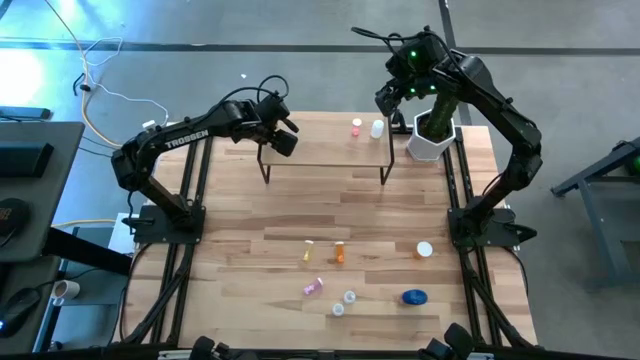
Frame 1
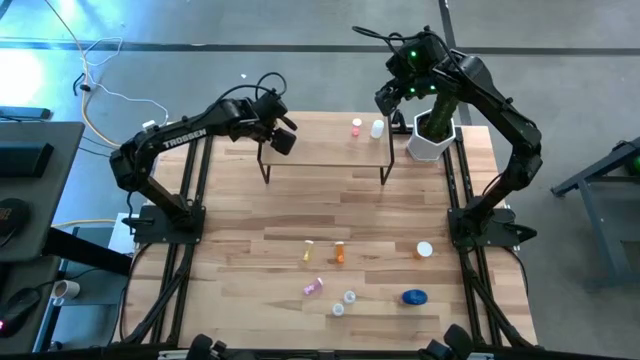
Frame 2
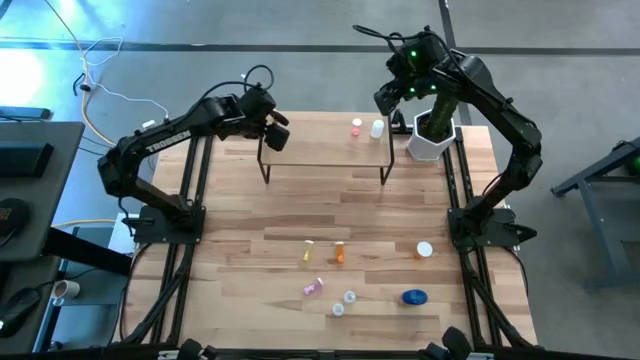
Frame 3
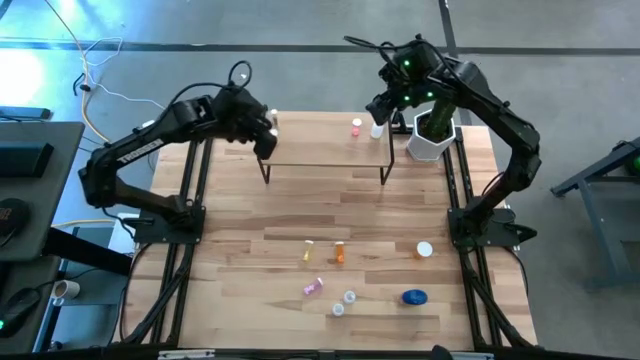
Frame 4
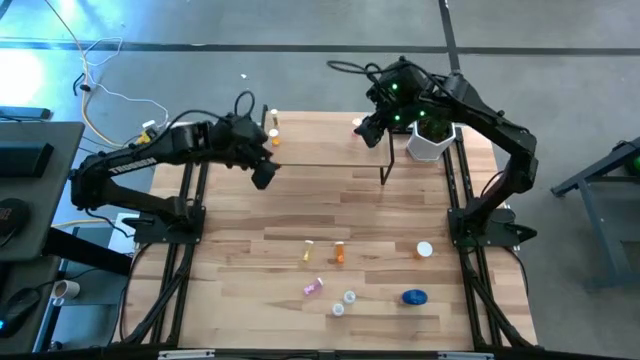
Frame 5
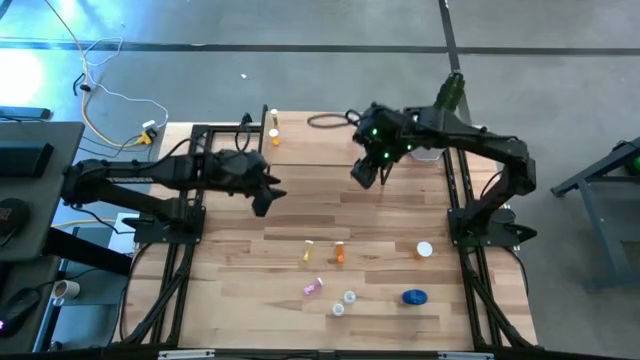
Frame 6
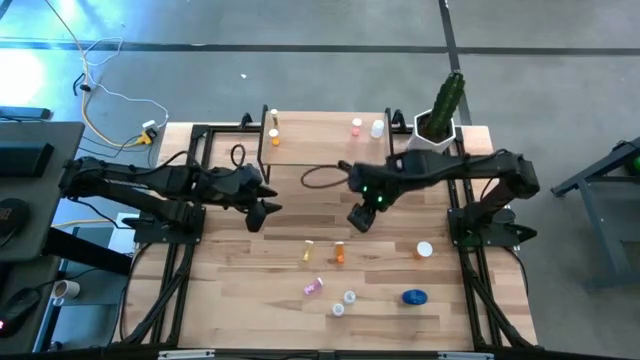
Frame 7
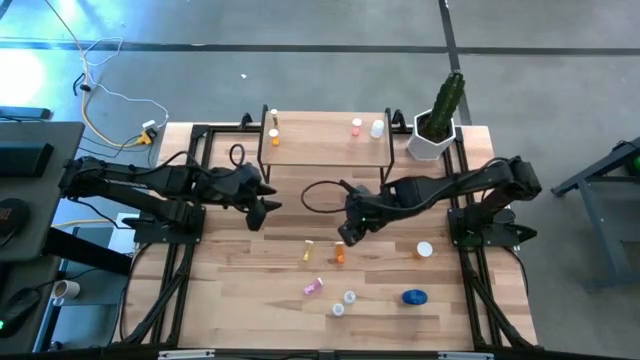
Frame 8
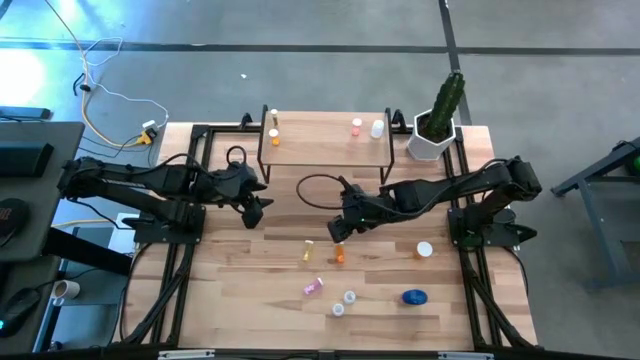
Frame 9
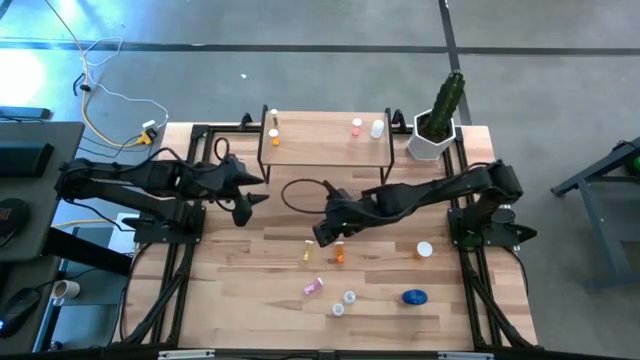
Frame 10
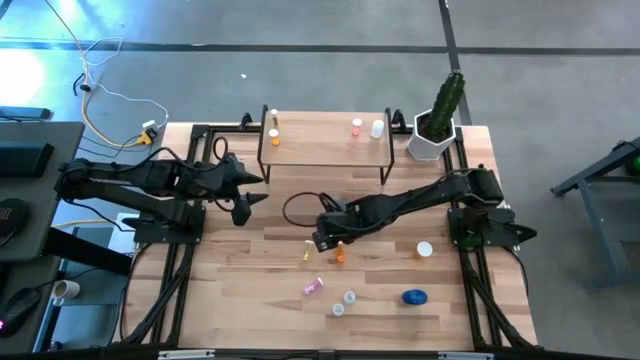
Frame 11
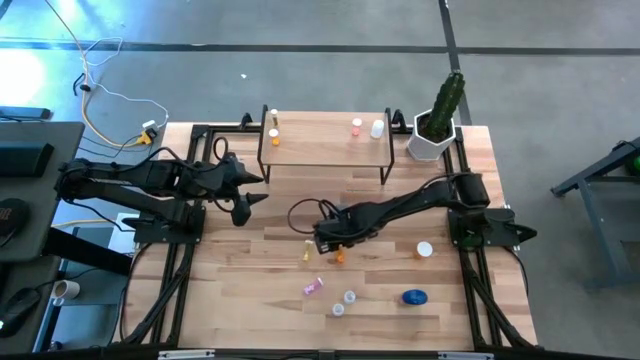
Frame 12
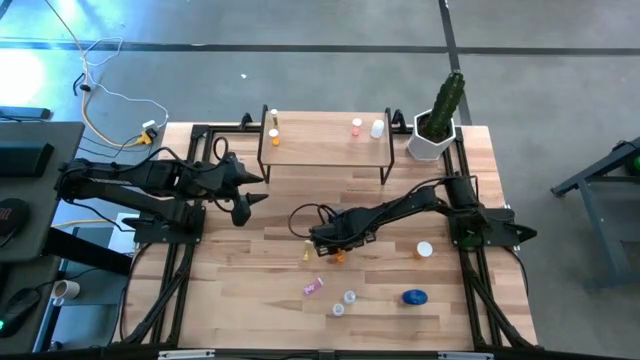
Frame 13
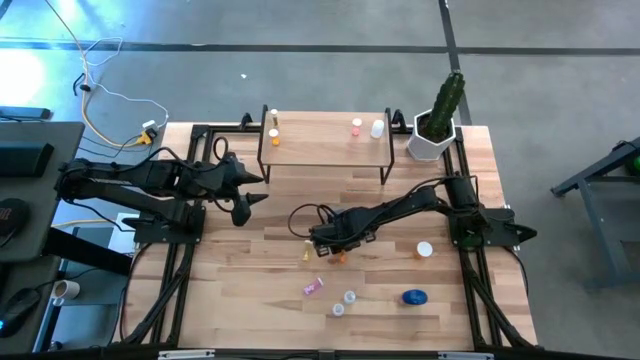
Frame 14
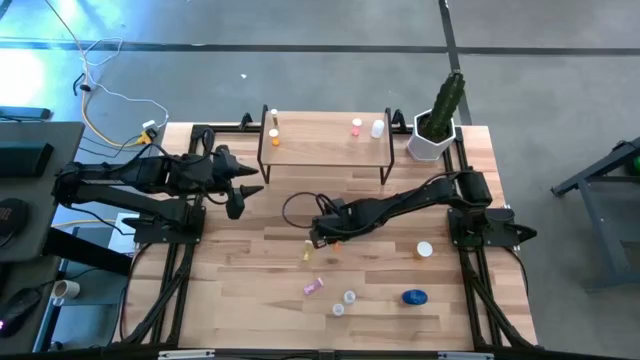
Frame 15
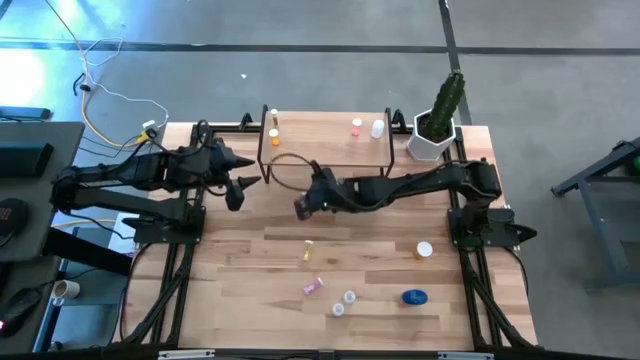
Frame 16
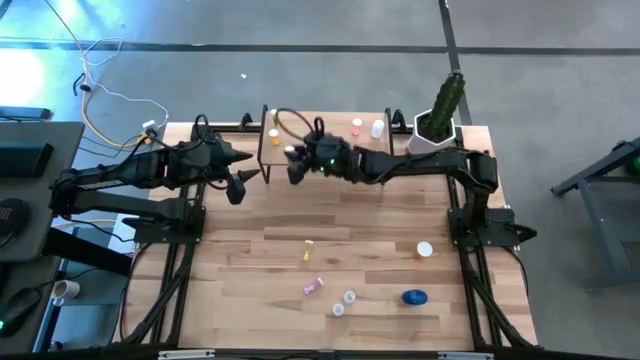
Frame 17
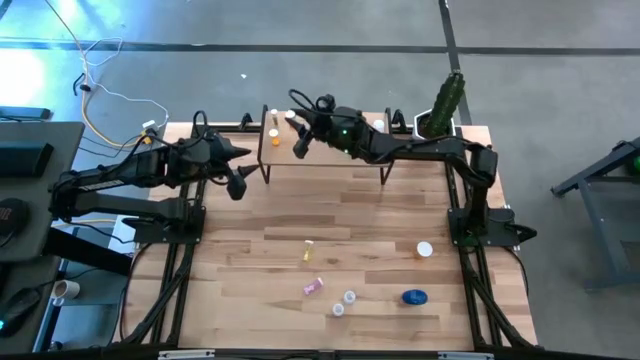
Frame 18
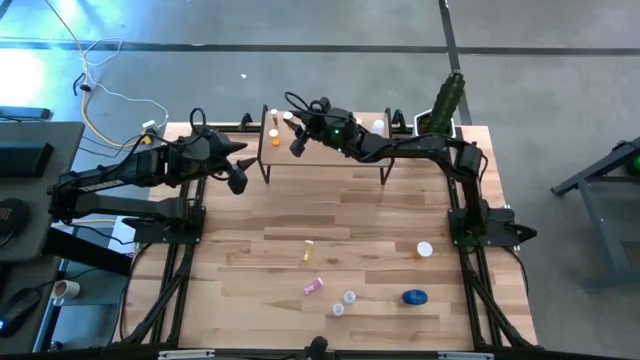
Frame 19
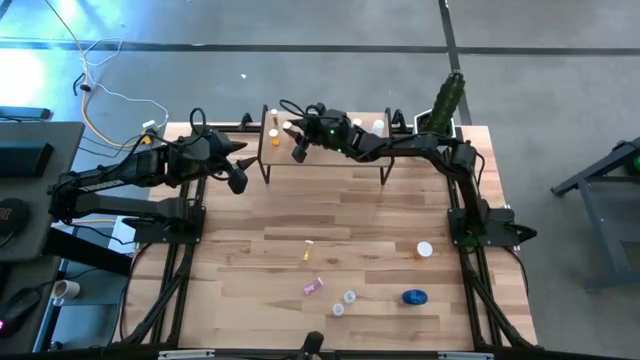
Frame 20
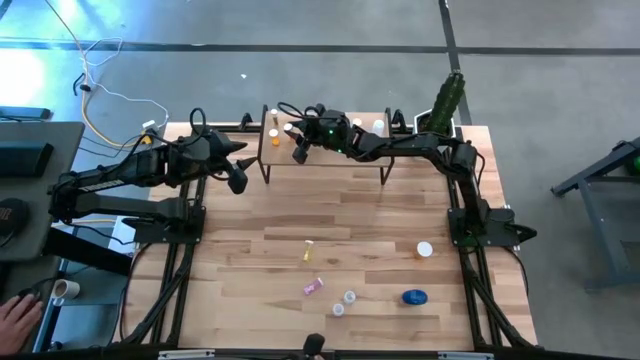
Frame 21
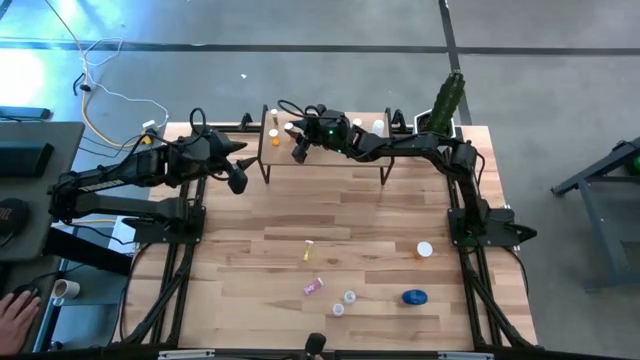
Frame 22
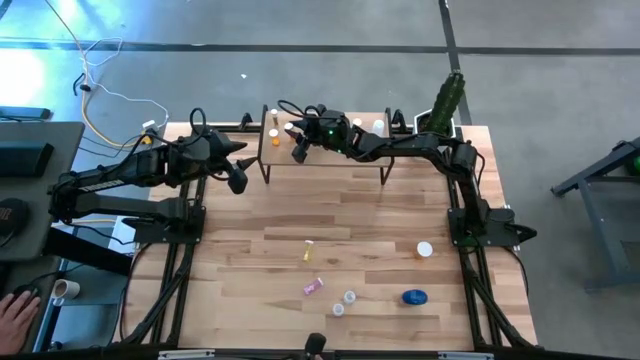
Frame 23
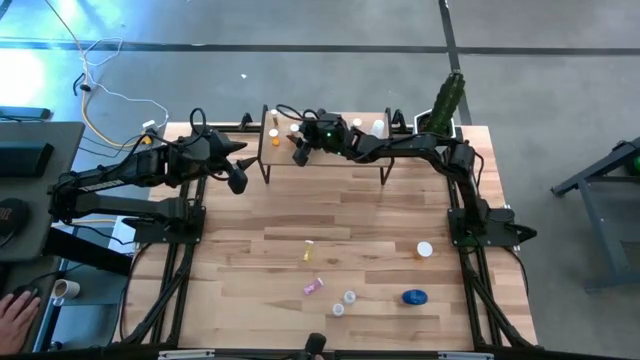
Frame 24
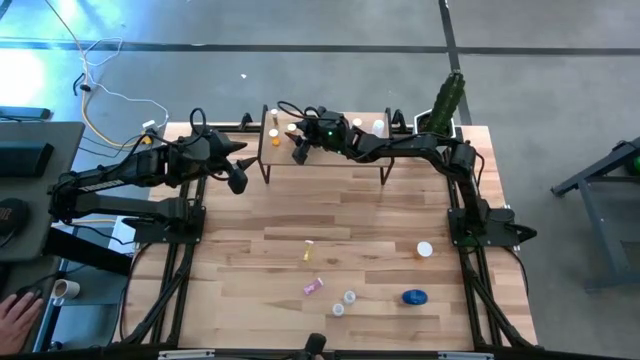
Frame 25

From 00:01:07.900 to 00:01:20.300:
Task: Pick and place medicine bottles onto shelf by color
Put the orange pill bottle on the shelf

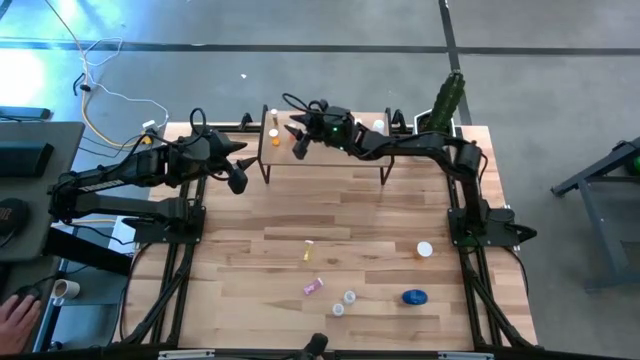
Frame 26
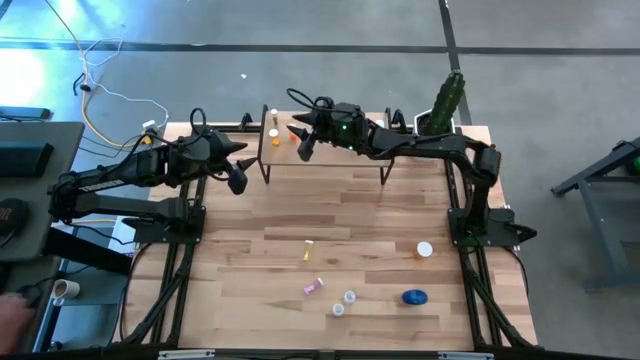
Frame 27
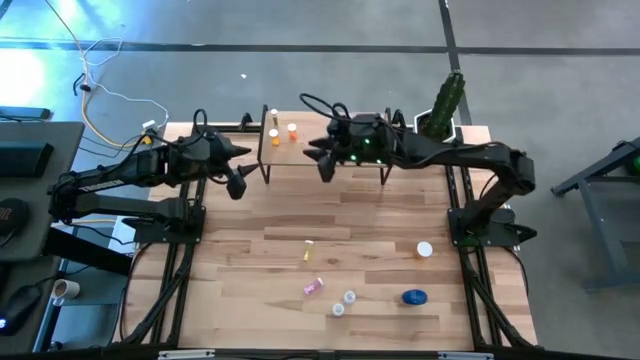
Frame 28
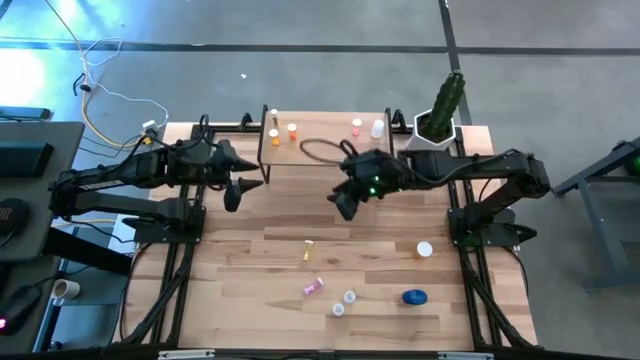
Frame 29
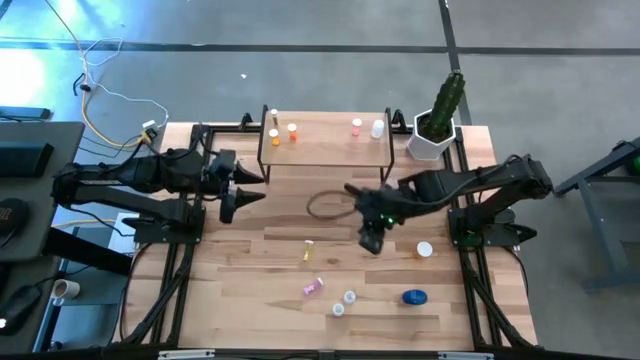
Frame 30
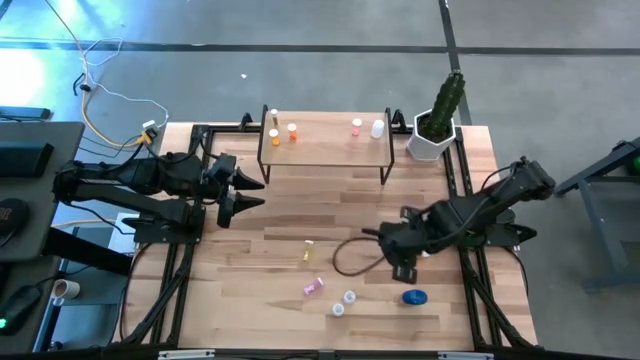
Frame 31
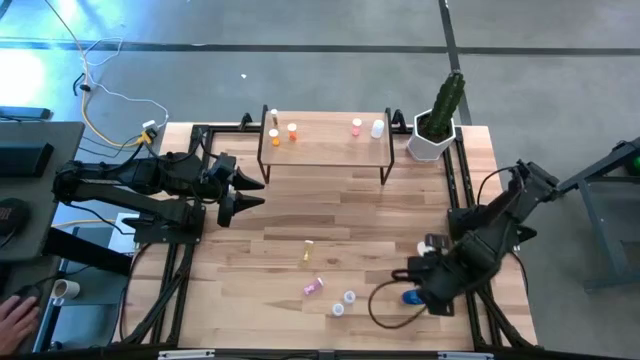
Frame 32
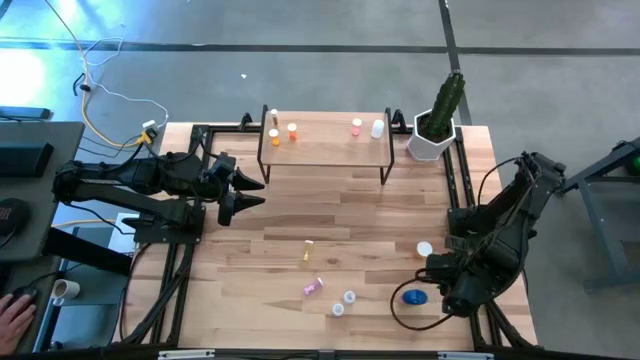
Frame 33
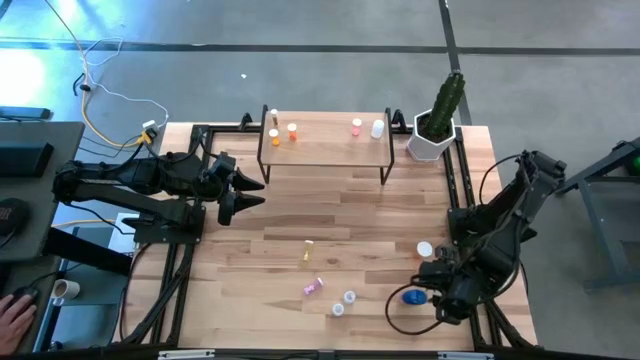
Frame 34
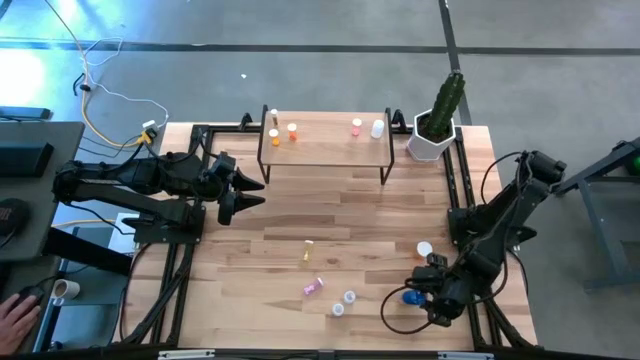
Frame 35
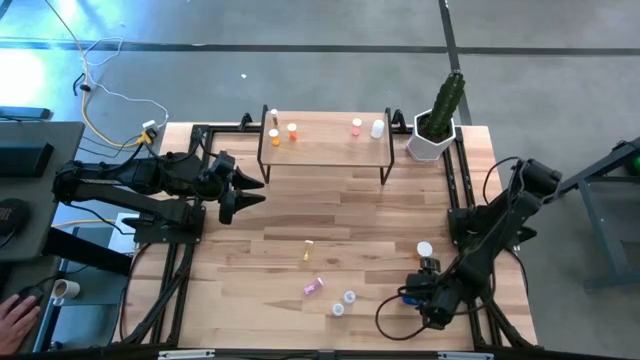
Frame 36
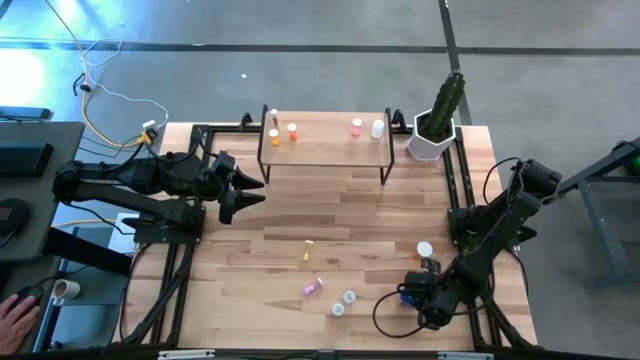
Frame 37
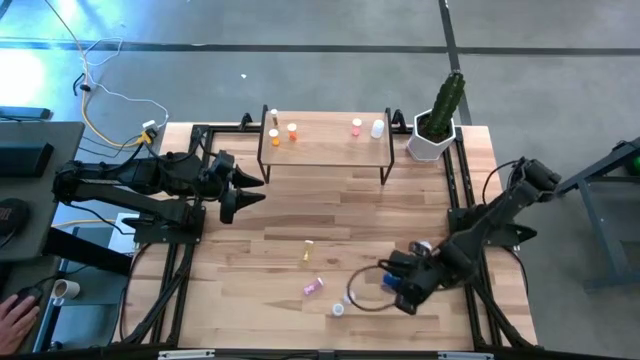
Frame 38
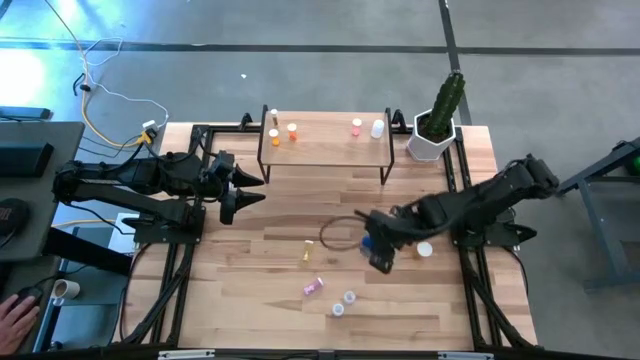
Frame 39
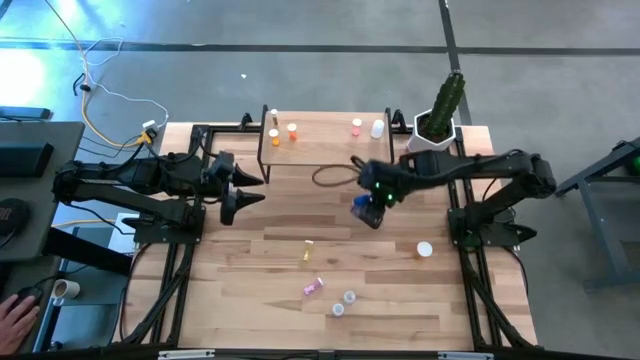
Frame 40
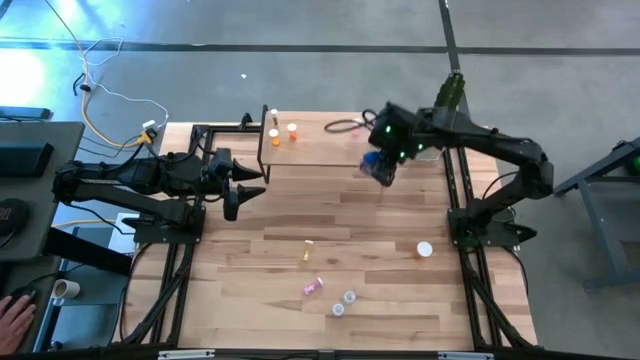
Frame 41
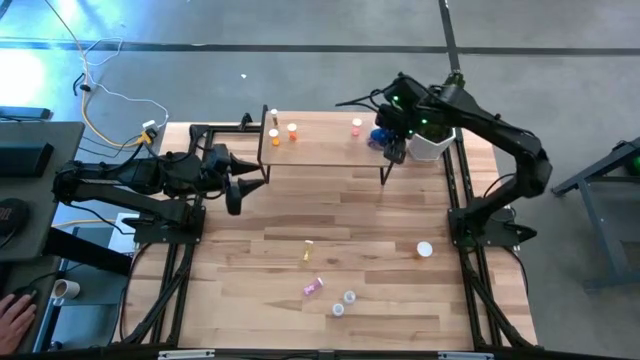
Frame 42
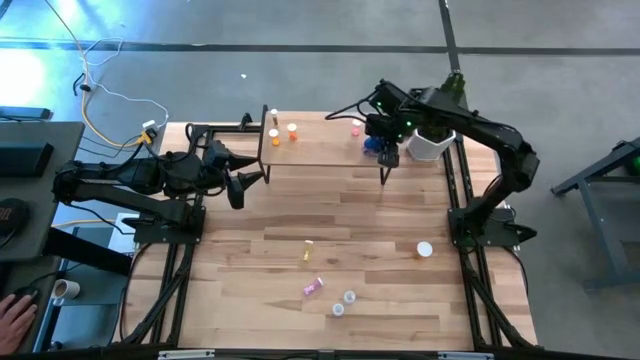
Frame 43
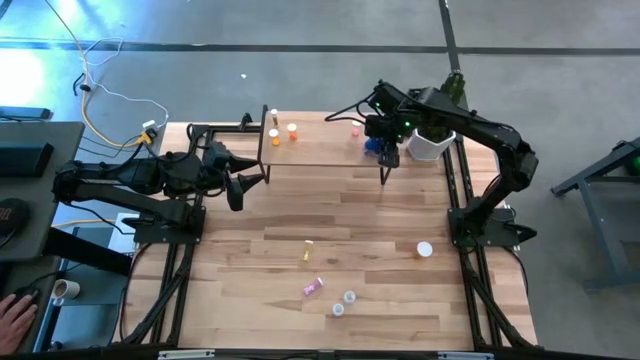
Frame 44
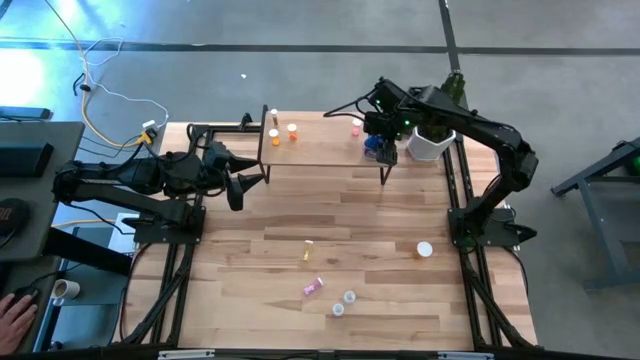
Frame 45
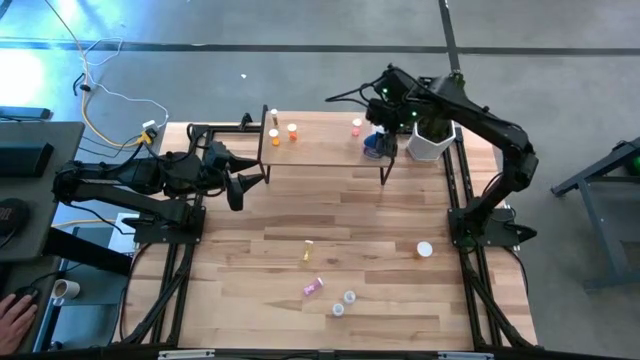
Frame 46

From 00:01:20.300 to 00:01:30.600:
Put the blue medicine bottle on the shelf
